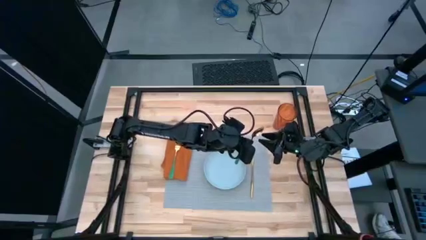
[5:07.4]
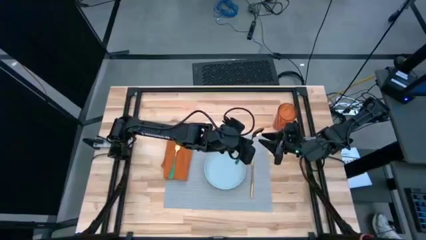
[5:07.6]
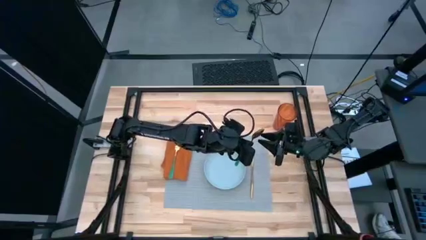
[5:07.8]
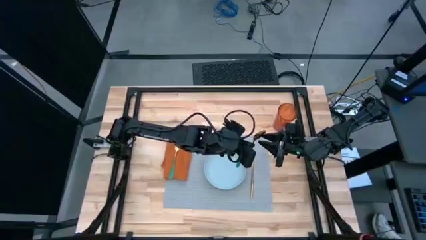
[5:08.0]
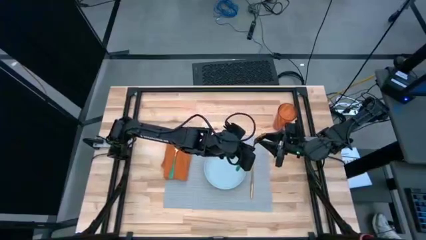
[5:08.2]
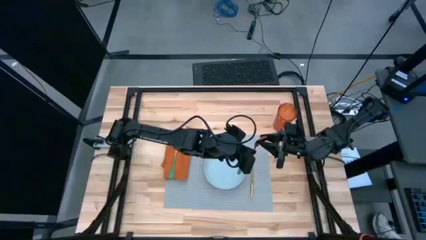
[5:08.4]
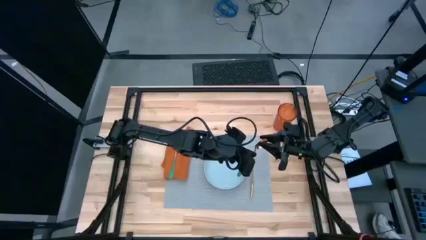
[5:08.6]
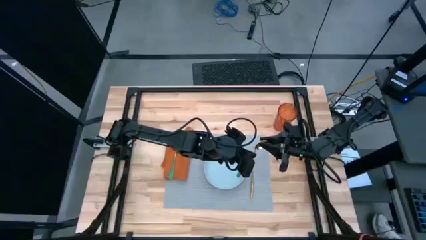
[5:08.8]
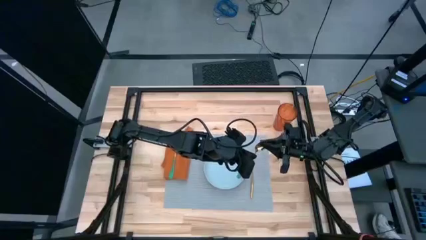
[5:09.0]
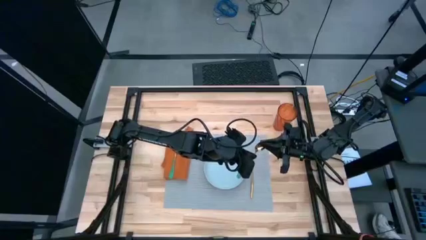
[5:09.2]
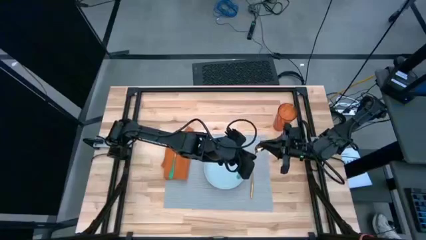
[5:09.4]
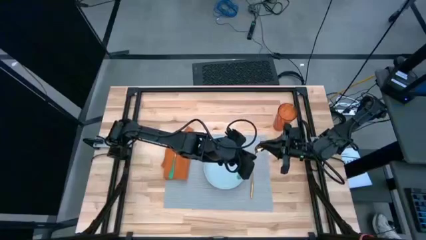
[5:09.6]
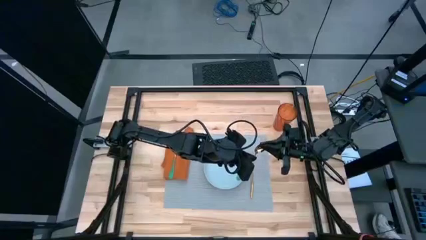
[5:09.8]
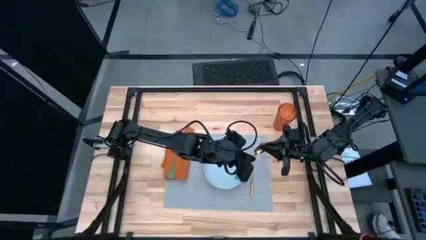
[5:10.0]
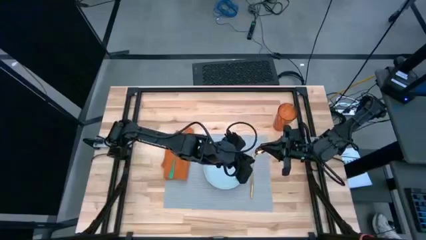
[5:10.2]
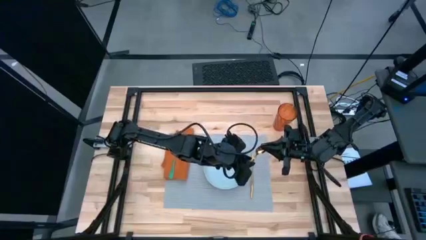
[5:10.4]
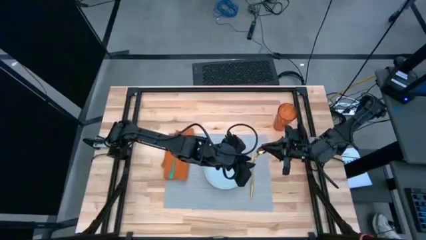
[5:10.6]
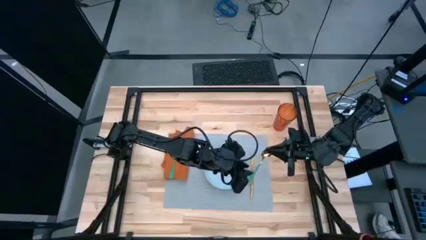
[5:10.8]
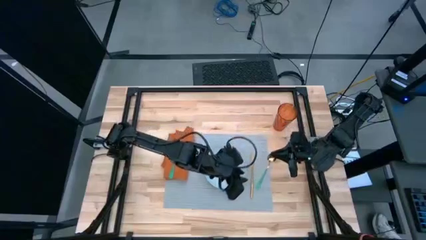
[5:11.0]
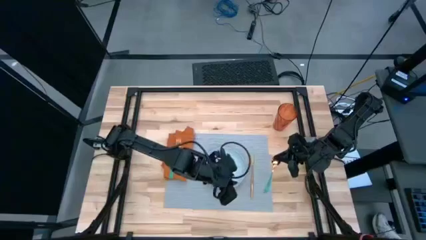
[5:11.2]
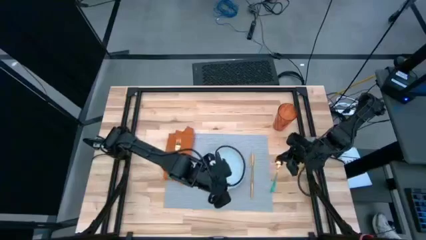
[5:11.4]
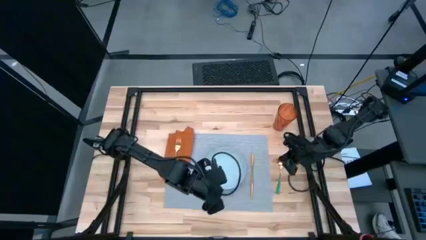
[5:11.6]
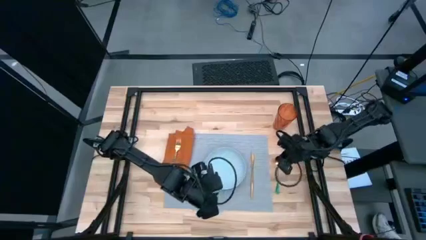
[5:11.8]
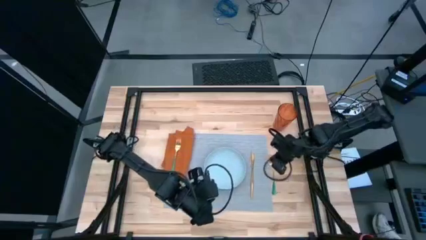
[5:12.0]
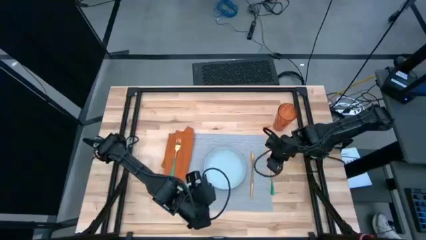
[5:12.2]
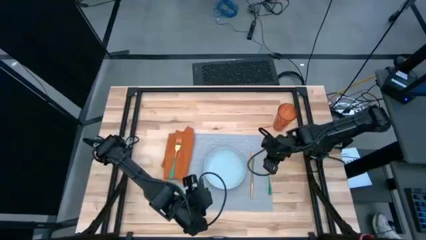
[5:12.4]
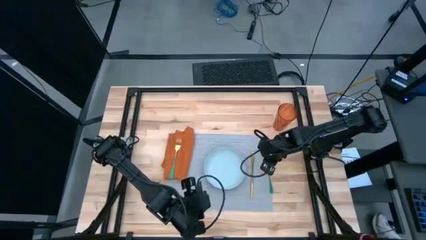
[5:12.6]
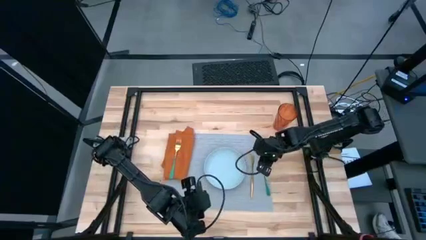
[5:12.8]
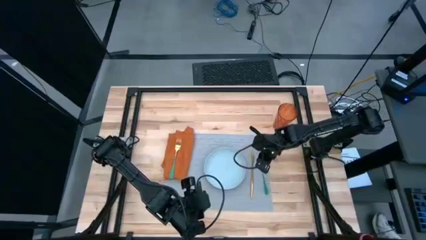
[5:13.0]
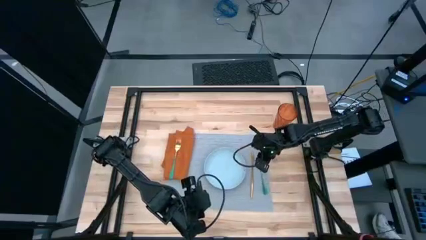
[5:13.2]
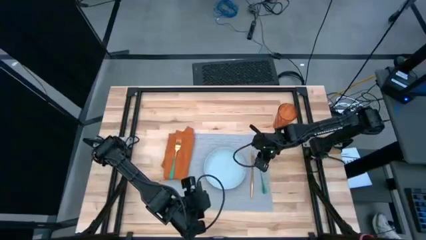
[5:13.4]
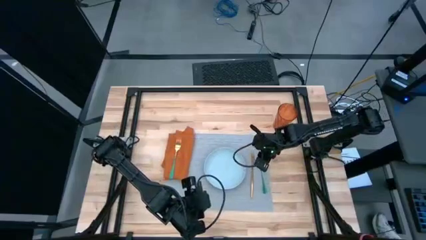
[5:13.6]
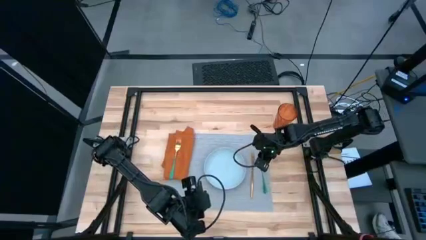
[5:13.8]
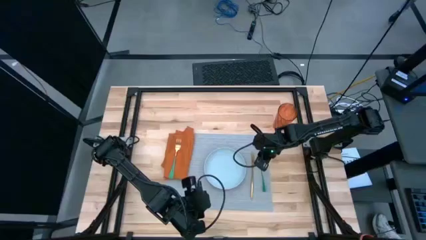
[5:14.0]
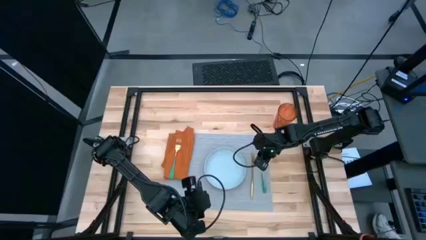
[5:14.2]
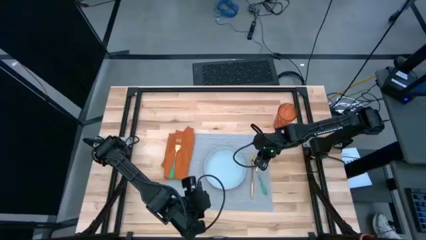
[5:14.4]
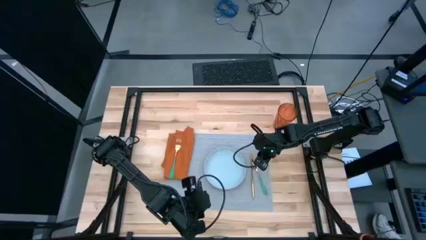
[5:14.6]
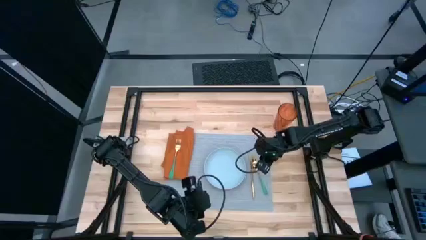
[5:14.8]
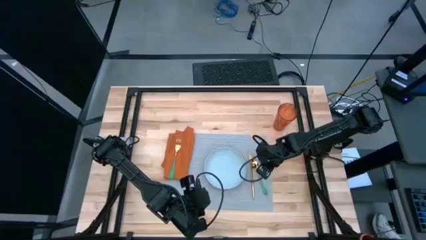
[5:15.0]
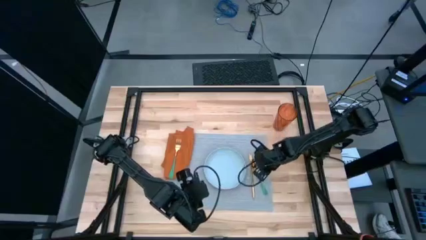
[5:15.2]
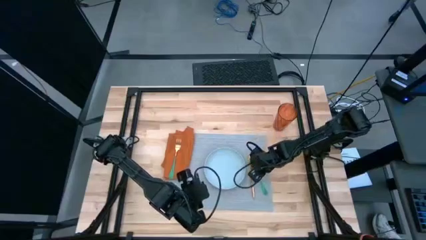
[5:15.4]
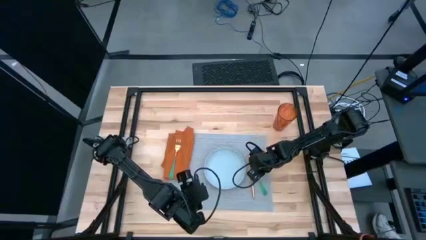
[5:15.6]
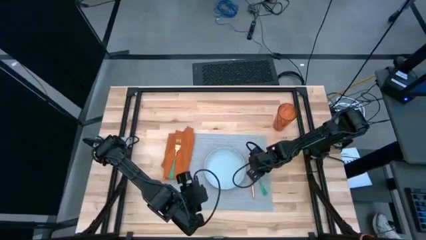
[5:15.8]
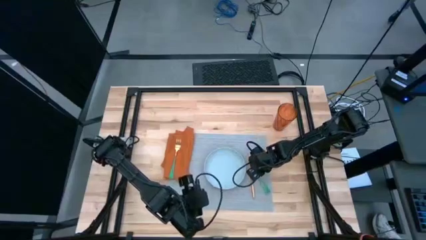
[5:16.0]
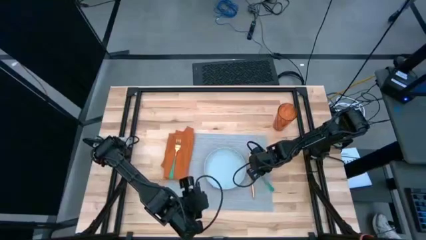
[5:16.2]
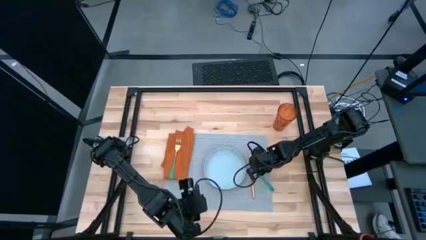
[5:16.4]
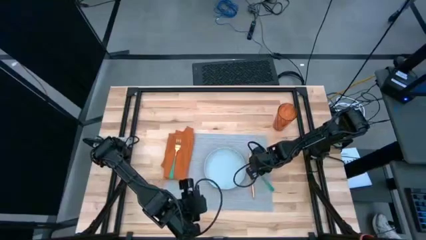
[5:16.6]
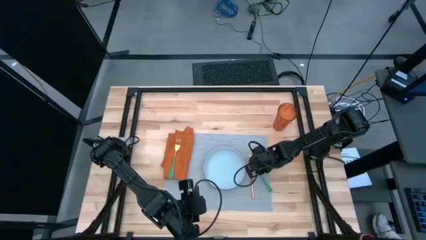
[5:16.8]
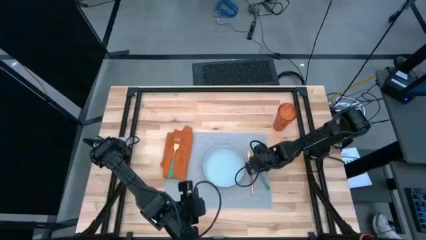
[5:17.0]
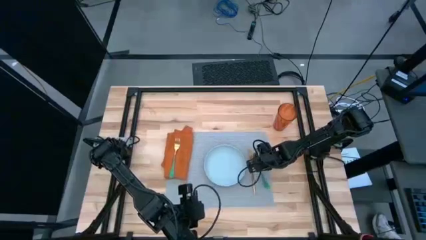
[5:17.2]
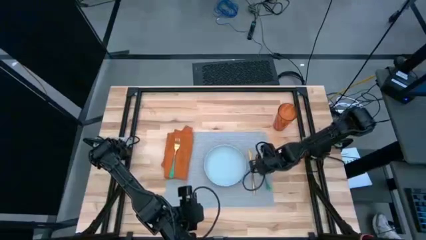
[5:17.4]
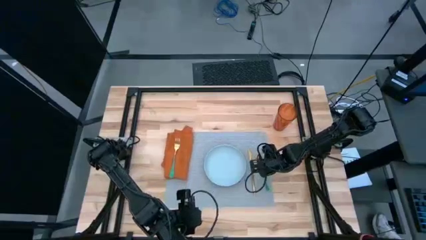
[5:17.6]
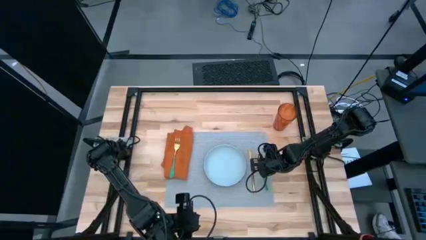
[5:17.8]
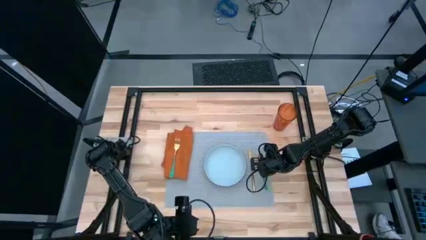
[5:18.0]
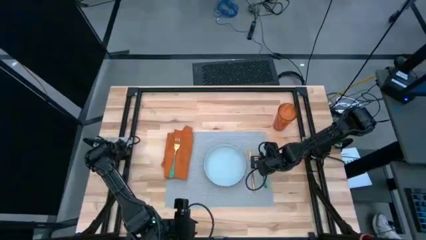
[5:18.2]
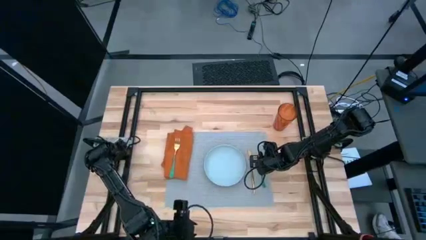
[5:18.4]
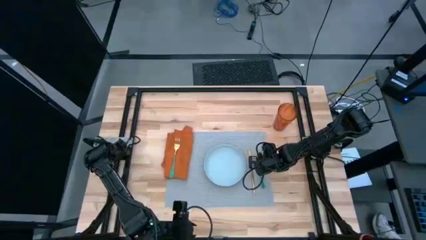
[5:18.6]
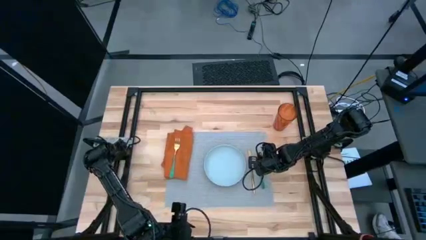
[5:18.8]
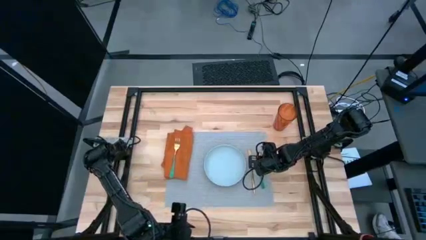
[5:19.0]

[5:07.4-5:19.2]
Task: Set table place
Put the green spoon on the gray table mat to the right of the gold table knife

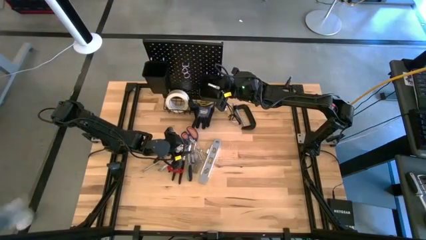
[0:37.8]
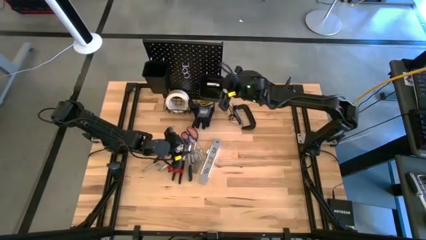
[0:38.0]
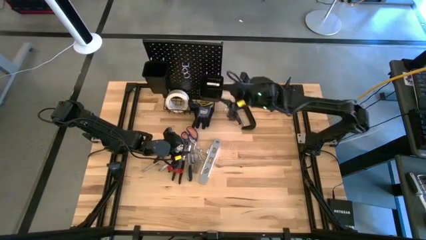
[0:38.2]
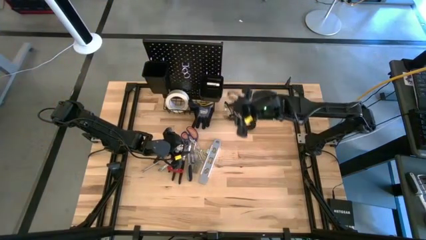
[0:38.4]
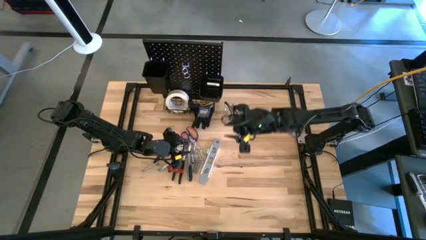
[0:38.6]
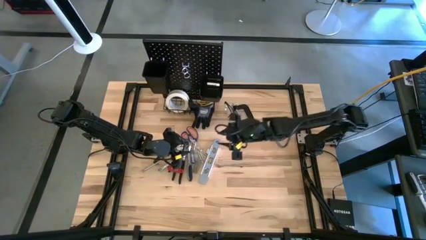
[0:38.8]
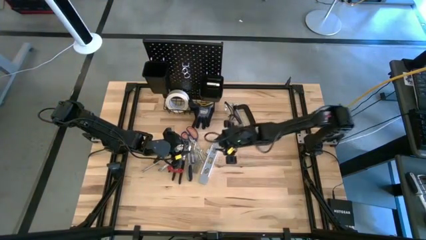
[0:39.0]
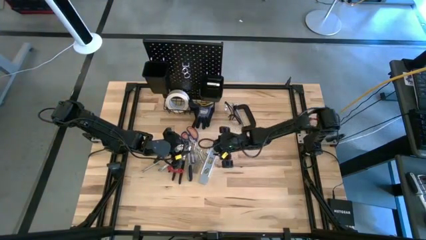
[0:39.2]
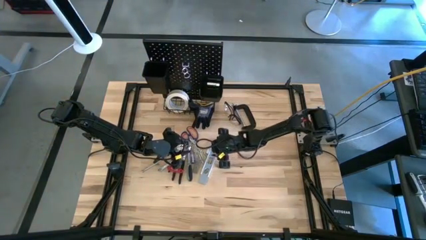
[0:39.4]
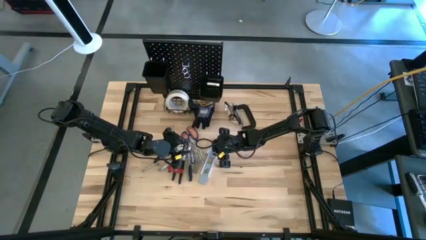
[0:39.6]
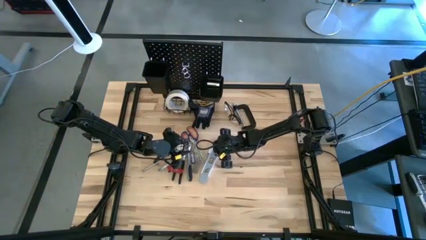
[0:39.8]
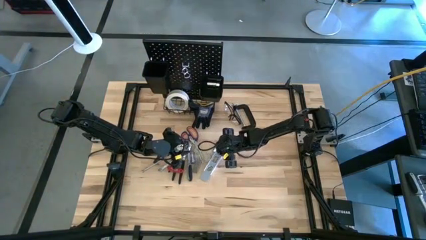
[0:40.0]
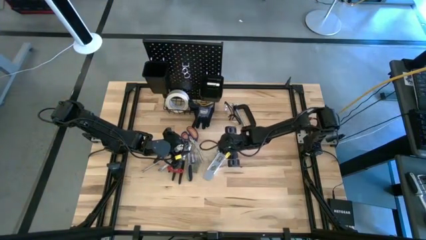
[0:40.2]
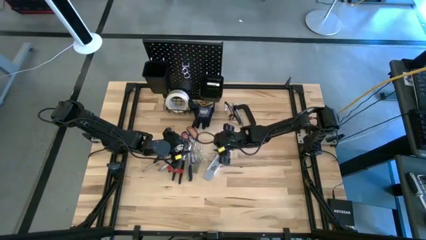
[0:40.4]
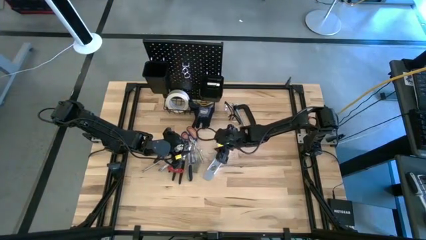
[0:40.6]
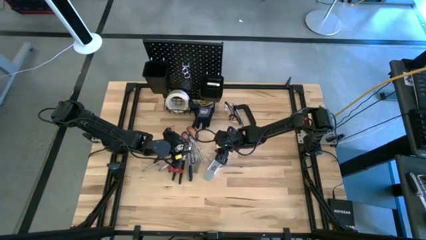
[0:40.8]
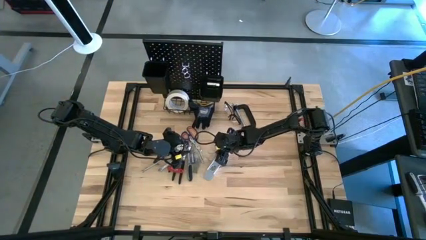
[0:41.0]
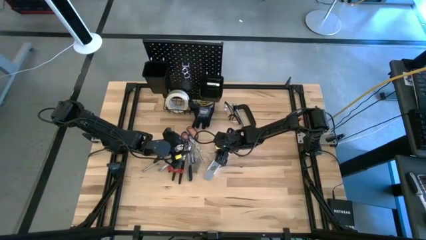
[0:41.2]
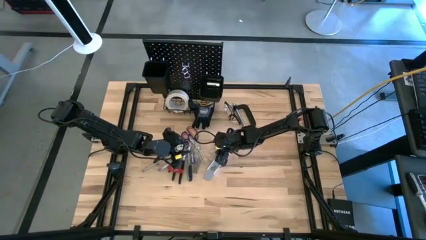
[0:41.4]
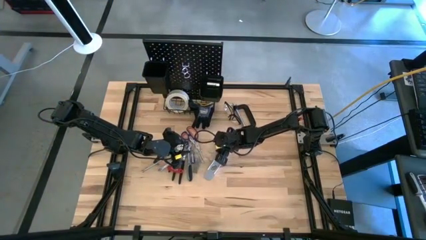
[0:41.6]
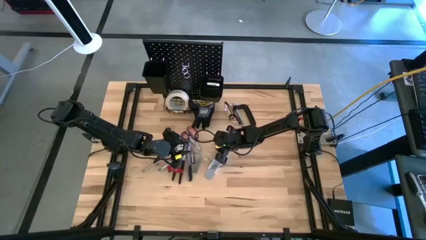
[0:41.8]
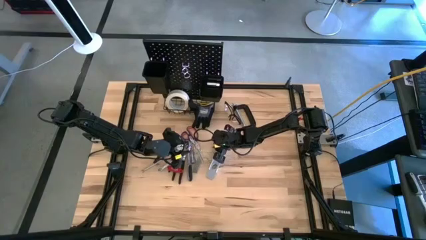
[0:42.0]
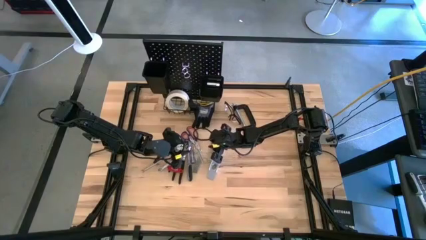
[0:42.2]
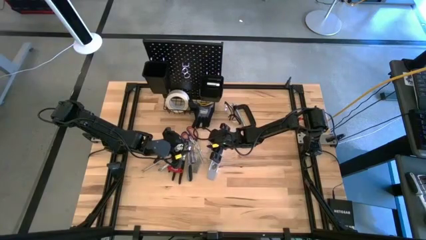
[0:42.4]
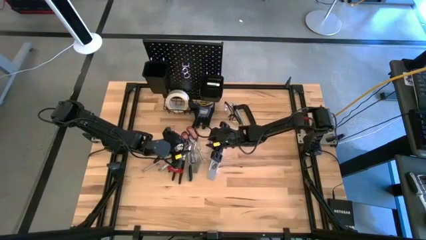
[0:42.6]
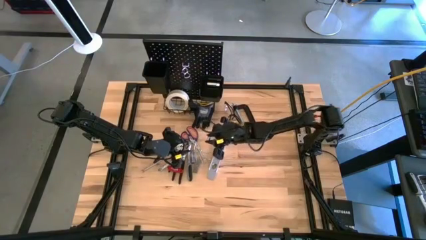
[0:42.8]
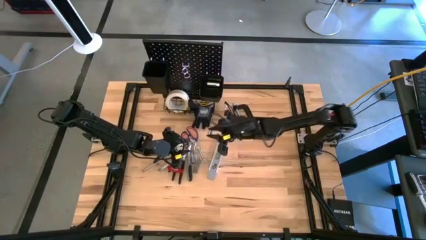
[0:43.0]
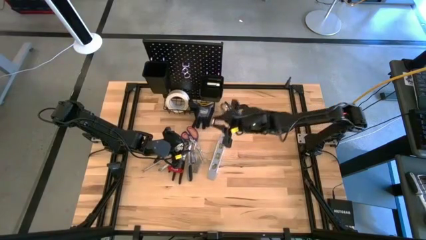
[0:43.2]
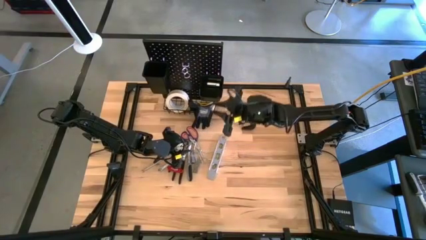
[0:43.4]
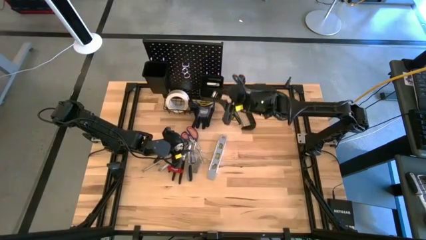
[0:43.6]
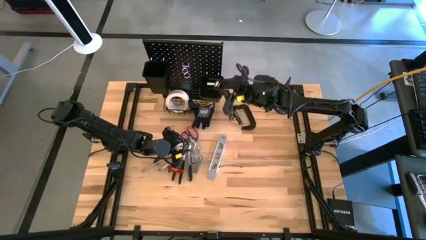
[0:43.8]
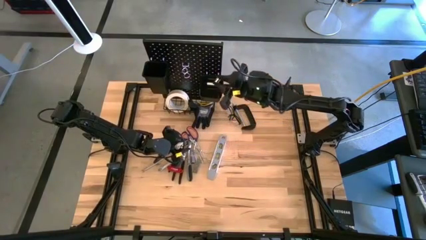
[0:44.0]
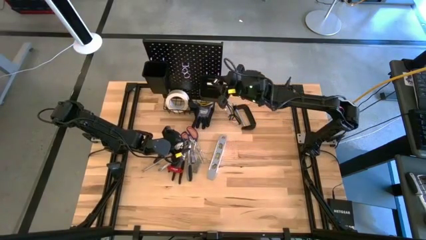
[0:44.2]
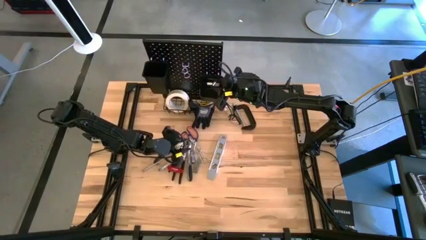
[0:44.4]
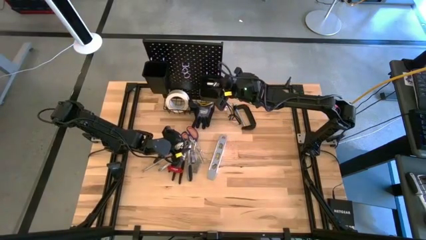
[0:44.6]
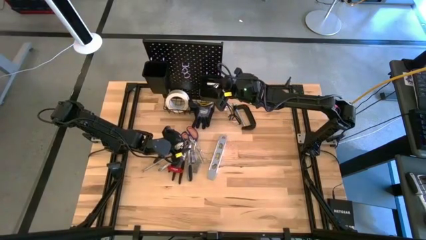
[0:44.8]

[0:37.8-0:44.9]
Task: Hang tools onto peg board
Put the socket into the right black bin on the pegboard
